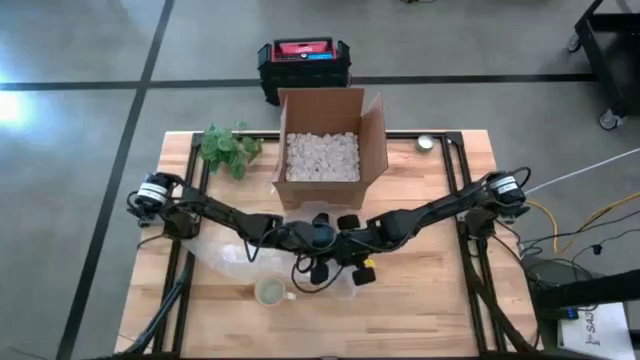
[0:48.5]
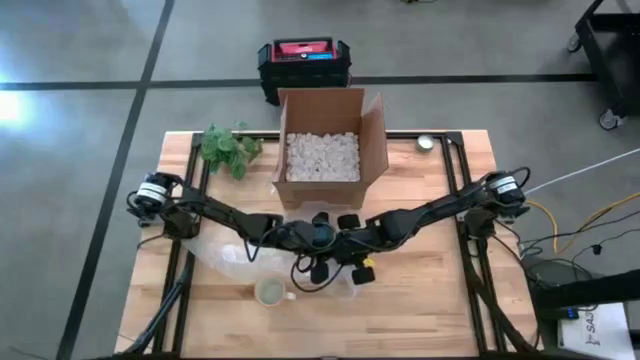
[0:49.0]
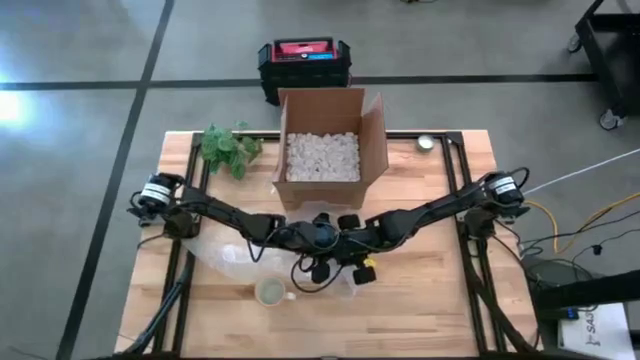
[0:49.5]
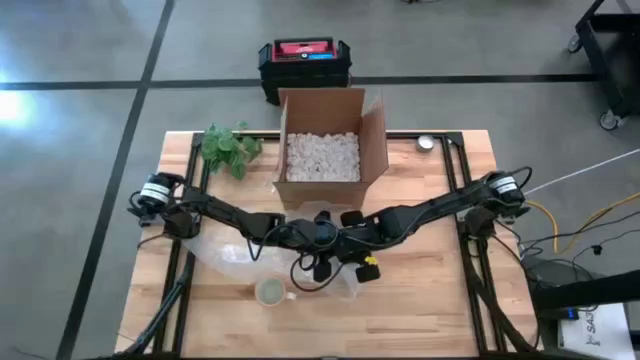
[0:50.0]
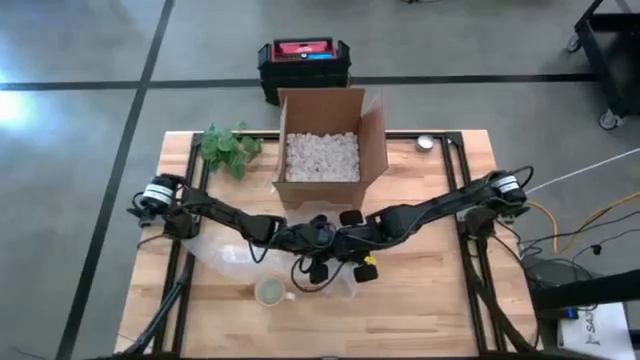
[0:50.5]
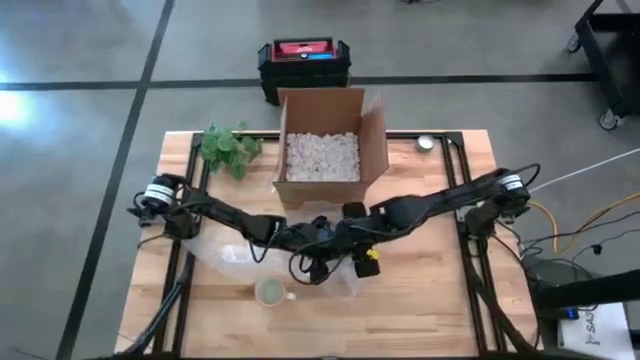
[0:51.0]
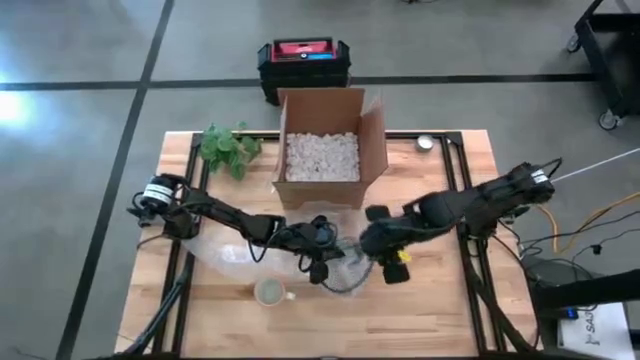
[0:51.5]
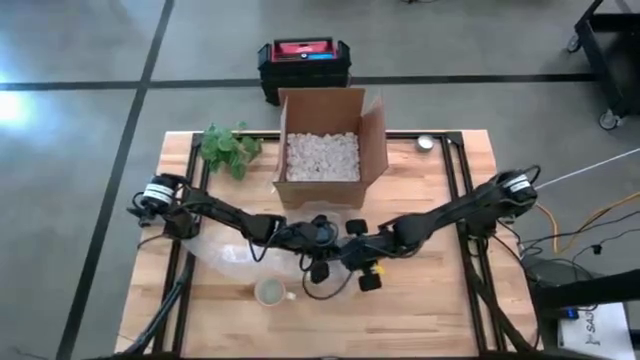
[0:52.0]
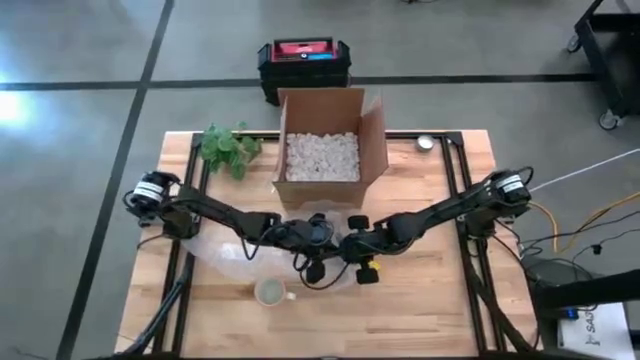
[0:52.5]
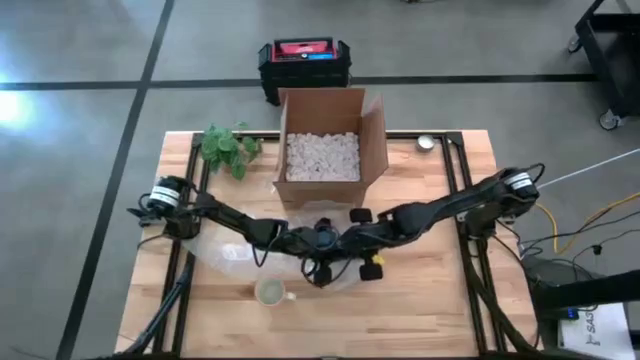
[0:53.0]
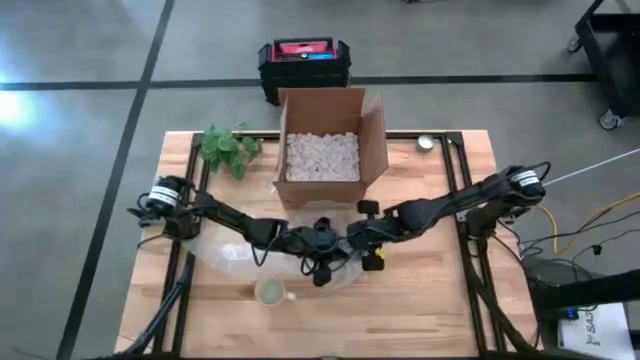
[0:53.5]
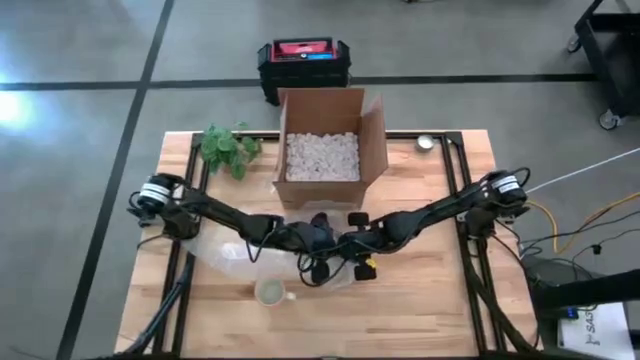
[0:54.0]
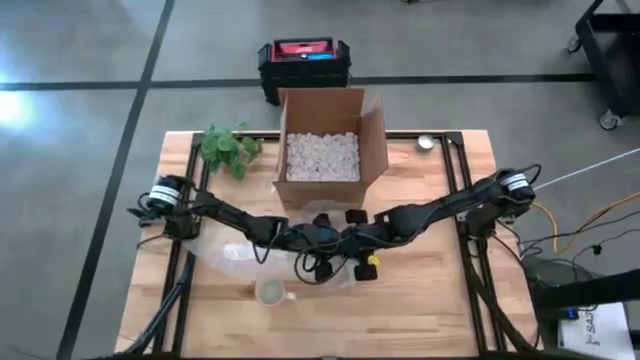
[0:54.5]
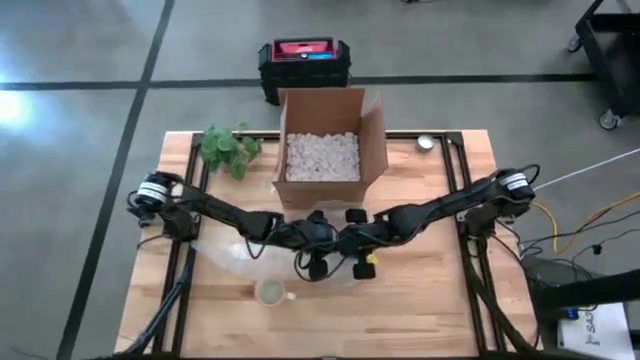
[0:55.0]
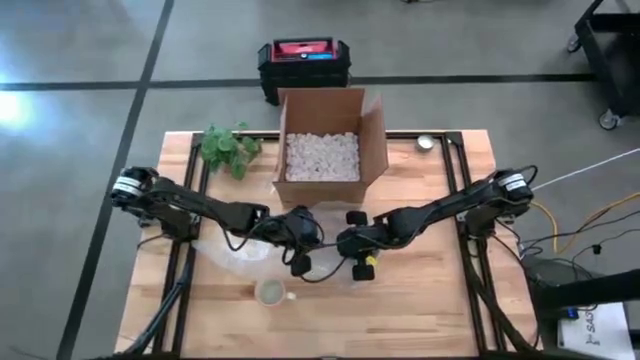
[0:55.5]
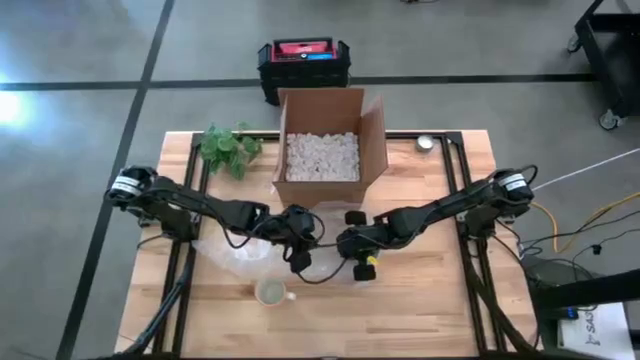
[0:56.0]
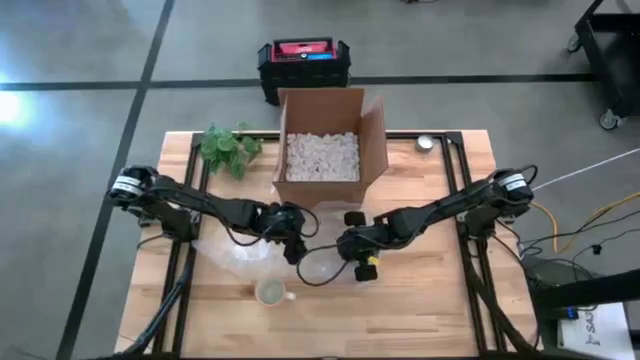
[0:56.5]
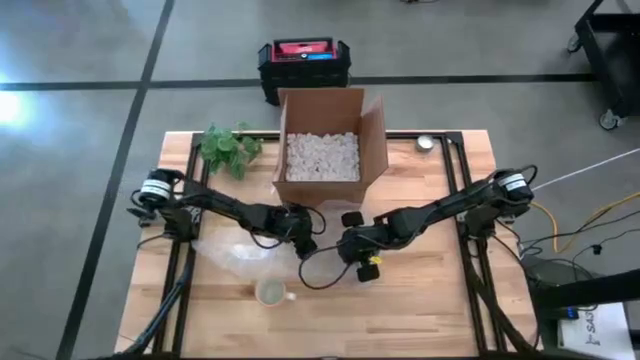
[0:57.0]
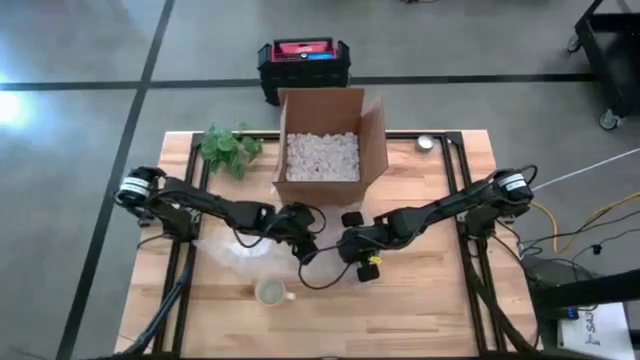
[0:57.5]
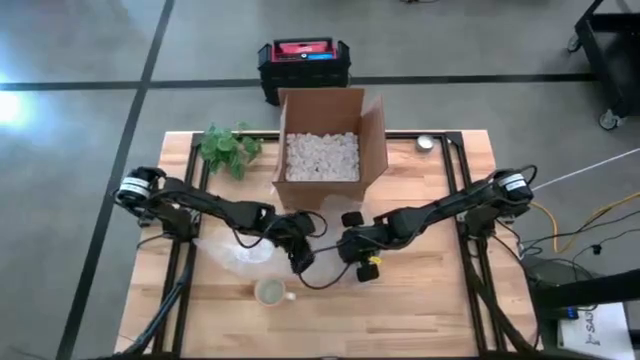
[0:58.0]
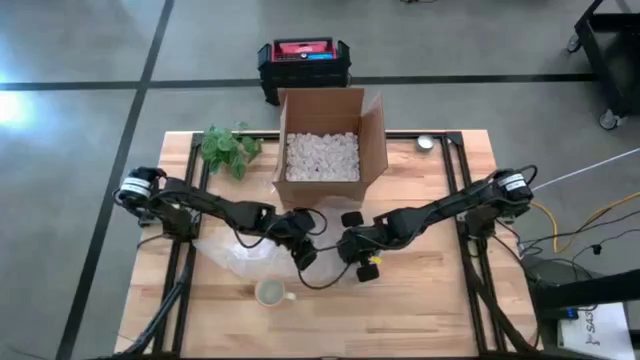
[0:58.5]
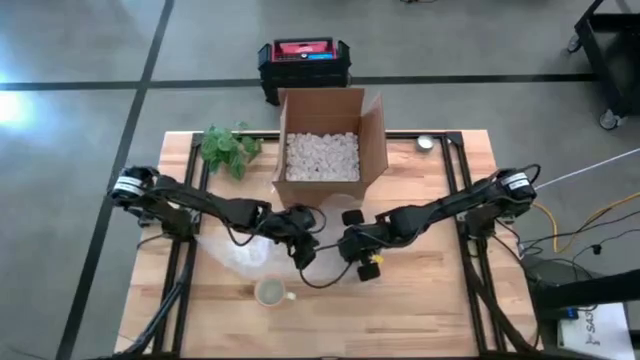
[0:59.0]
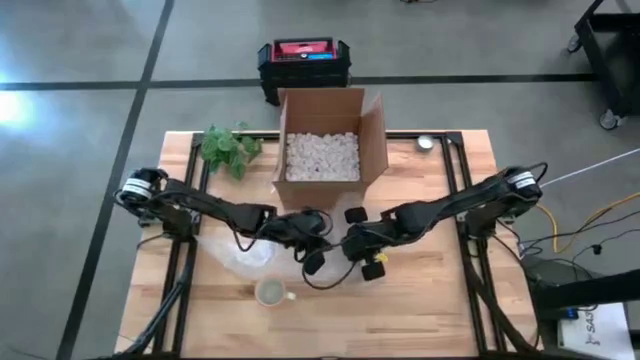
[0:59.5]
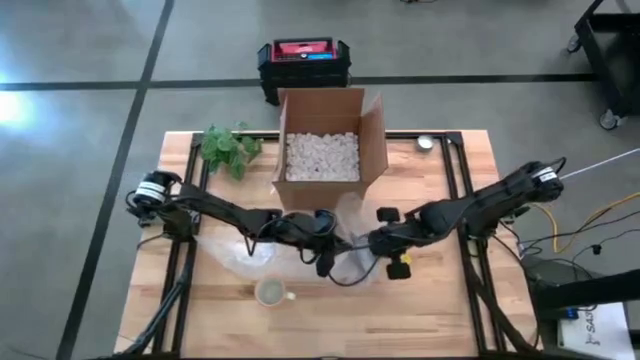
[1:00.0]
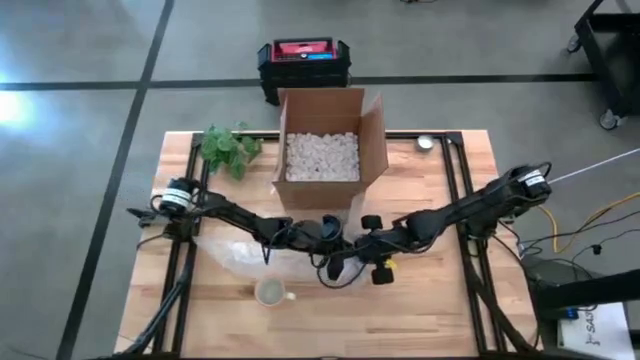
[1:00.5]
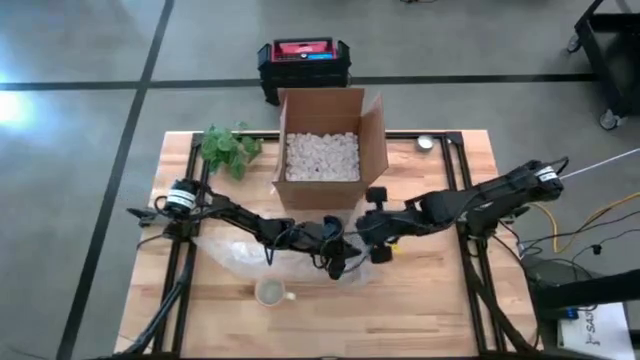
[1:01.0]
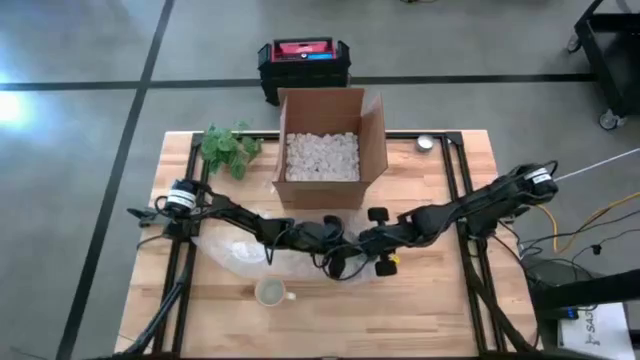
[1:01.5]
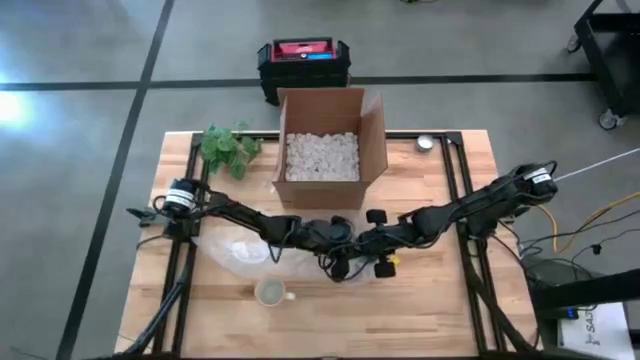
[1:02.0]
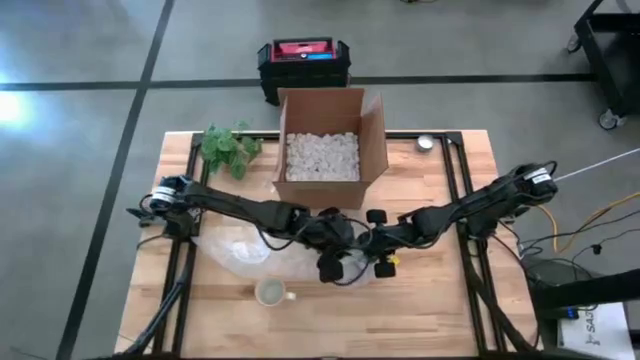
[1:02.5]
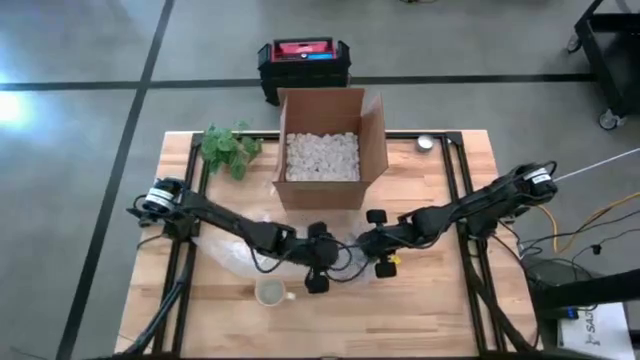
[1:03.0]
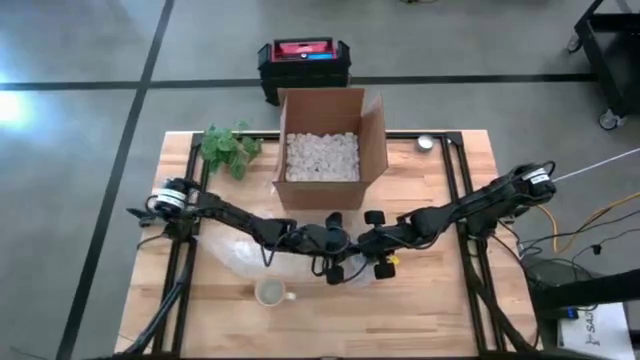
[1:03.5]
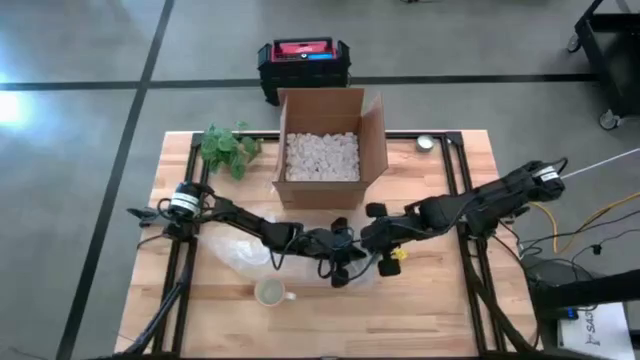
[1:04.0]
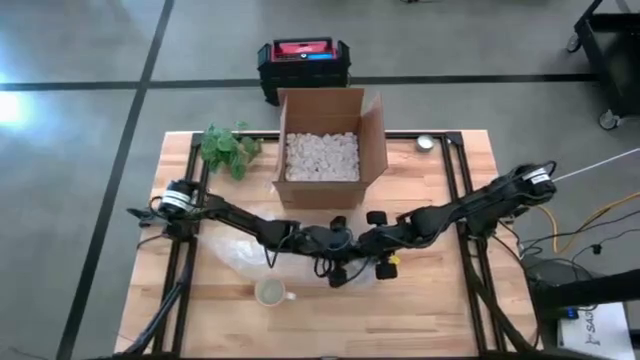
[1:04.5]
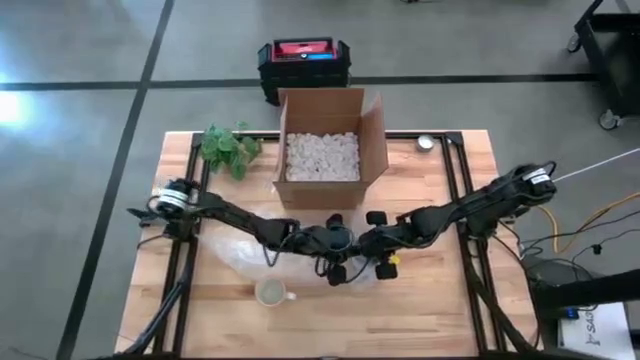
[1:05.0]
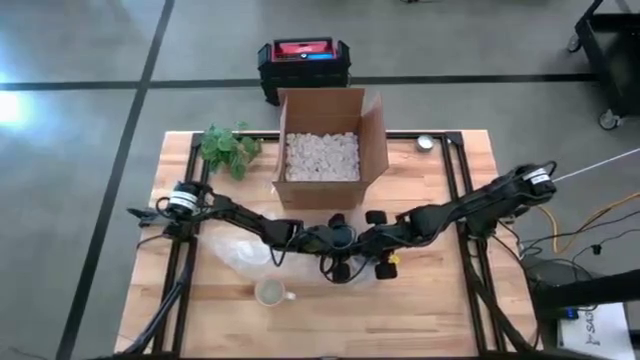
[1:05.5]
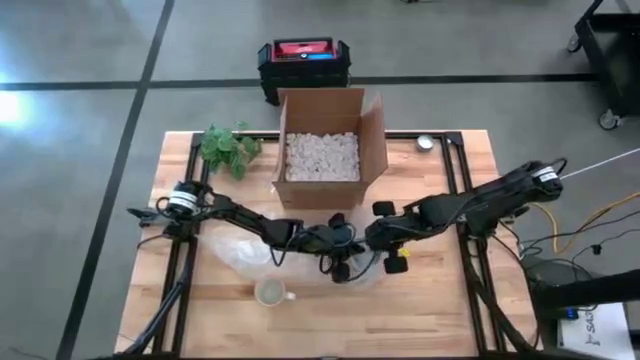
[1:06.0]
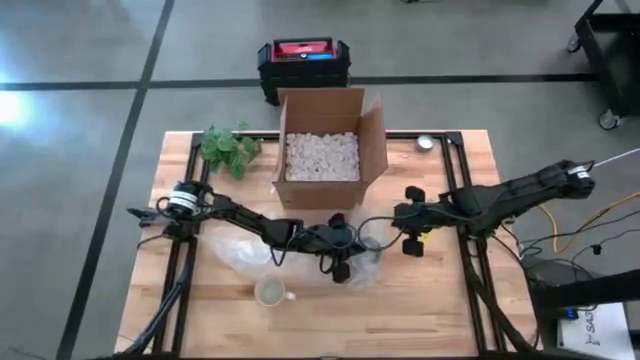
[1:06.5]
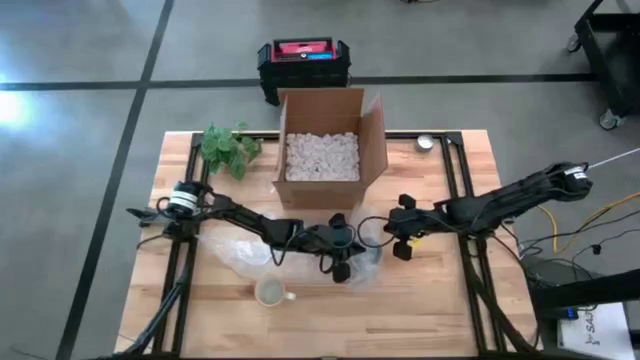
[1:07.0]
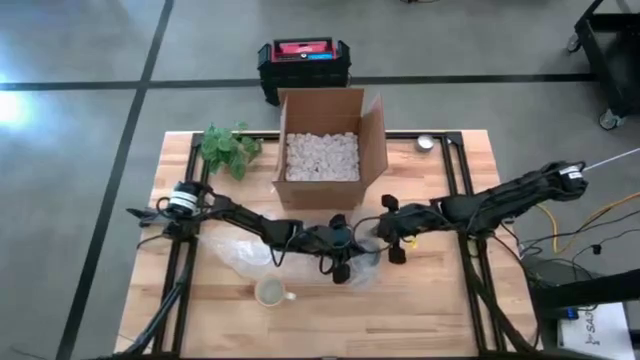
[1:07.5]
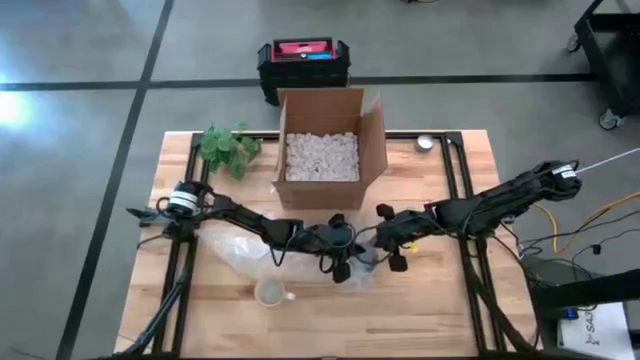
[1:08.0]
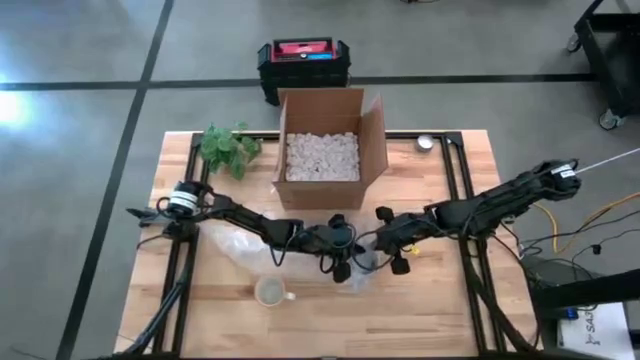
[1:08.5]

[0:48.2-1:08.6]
Task: wrap mug
Wrap the blue mug with the right bubble wrap
